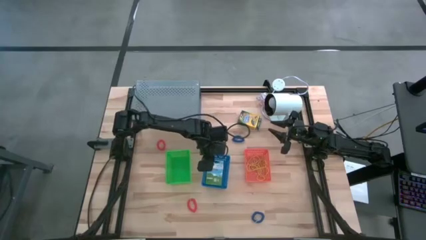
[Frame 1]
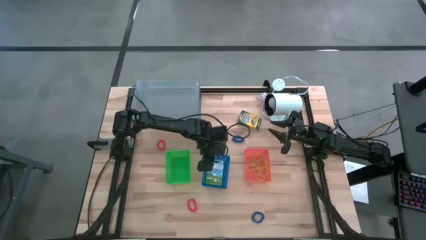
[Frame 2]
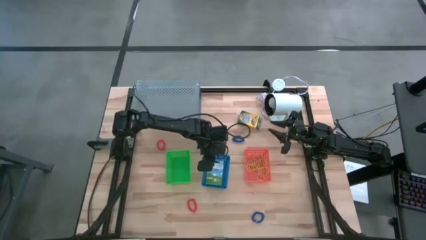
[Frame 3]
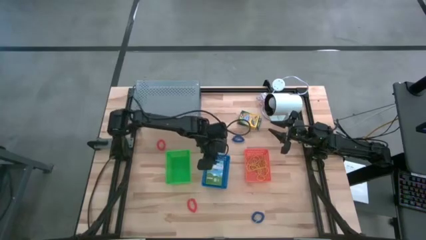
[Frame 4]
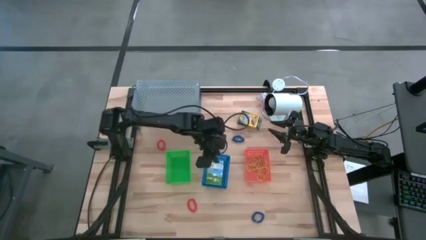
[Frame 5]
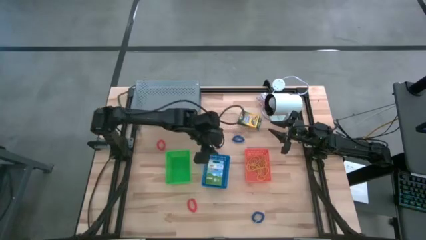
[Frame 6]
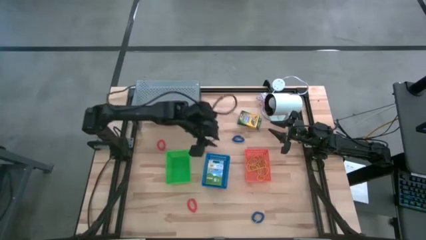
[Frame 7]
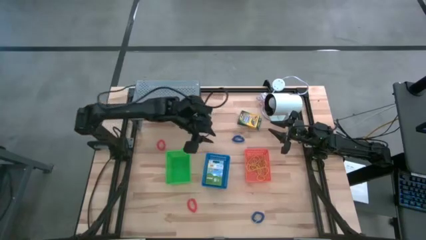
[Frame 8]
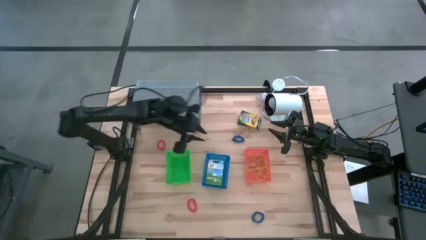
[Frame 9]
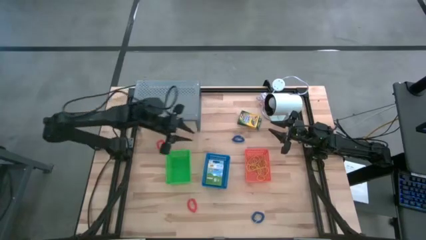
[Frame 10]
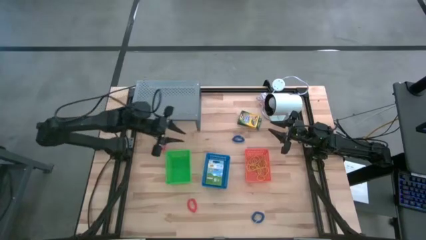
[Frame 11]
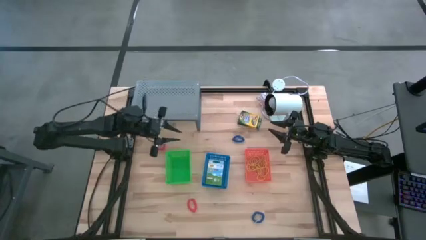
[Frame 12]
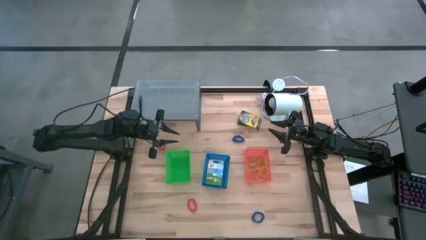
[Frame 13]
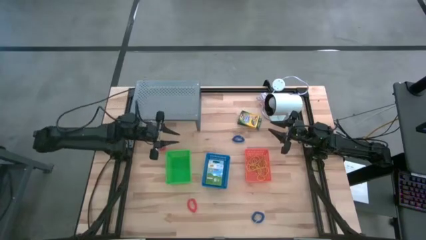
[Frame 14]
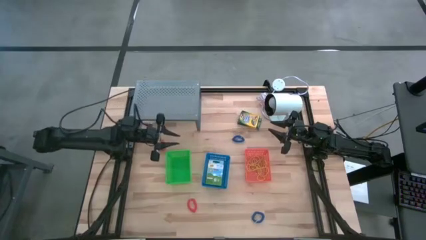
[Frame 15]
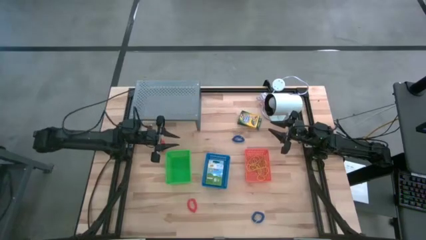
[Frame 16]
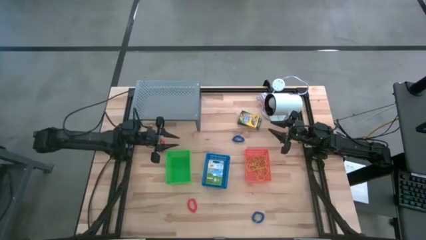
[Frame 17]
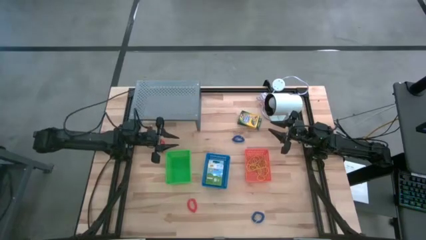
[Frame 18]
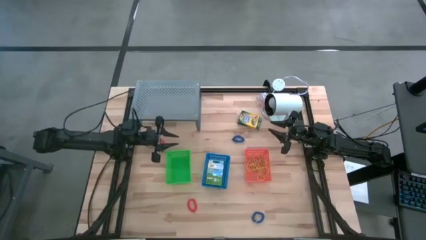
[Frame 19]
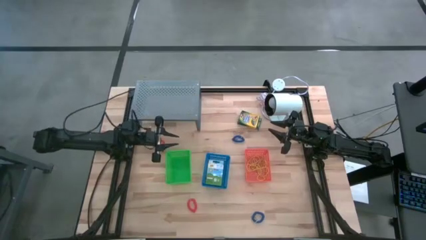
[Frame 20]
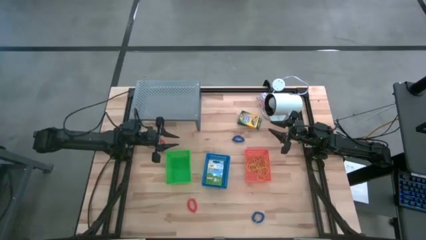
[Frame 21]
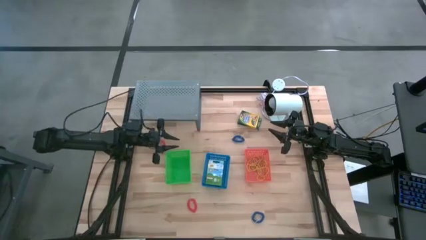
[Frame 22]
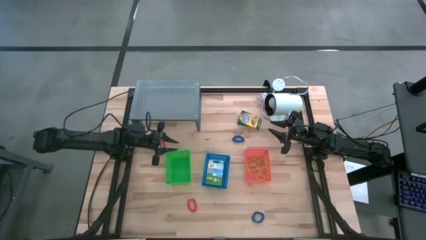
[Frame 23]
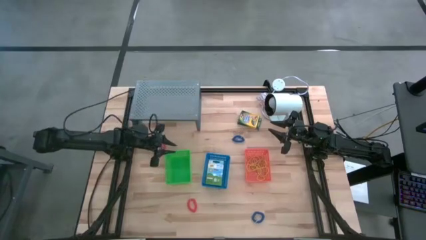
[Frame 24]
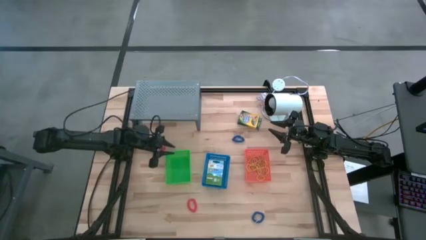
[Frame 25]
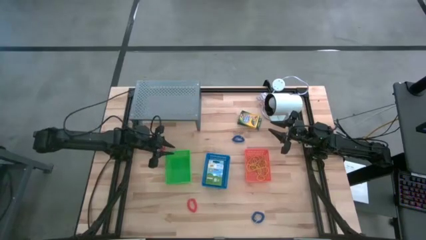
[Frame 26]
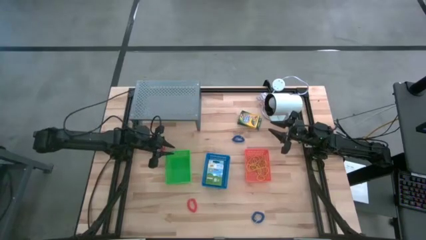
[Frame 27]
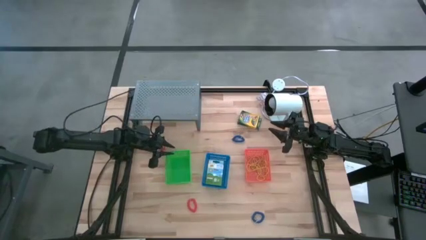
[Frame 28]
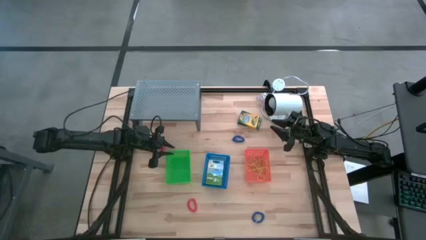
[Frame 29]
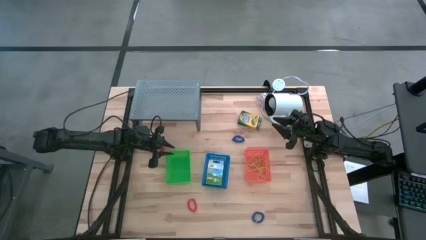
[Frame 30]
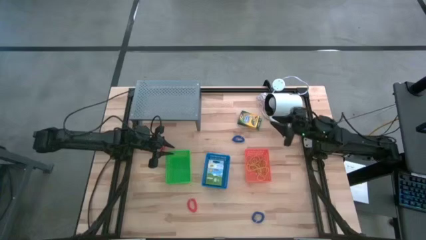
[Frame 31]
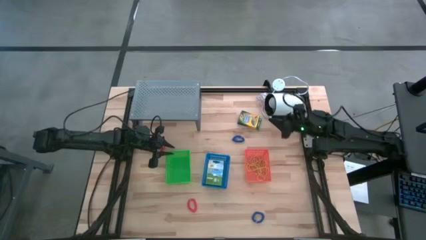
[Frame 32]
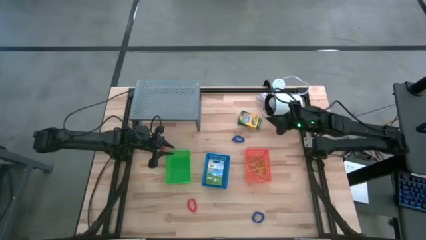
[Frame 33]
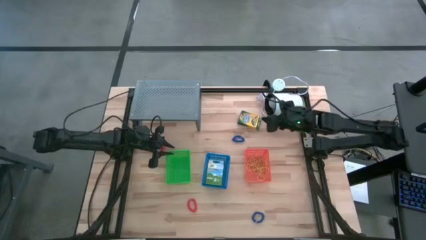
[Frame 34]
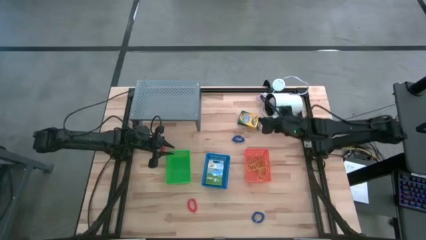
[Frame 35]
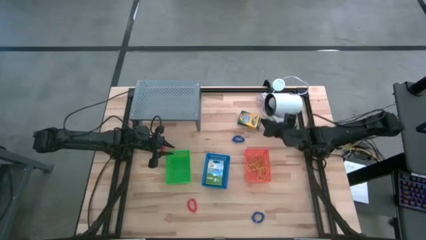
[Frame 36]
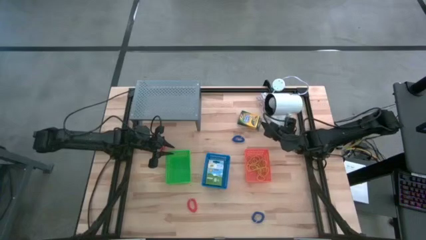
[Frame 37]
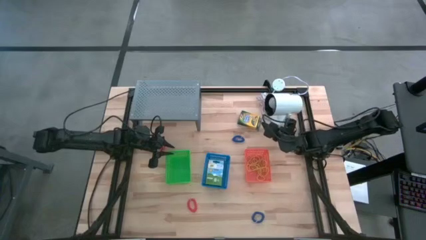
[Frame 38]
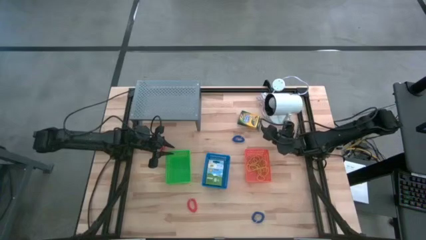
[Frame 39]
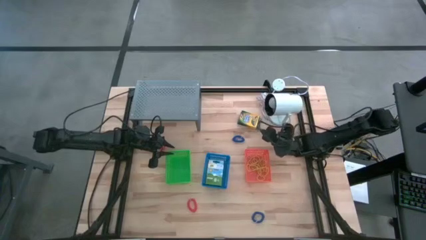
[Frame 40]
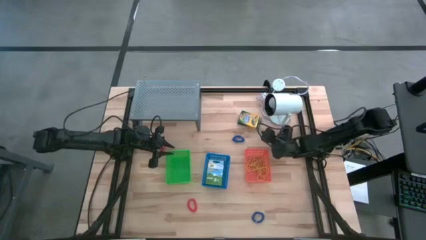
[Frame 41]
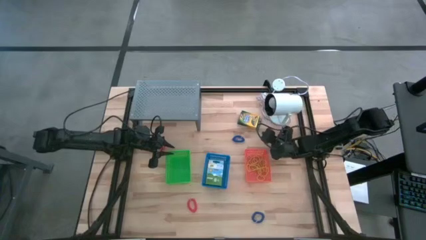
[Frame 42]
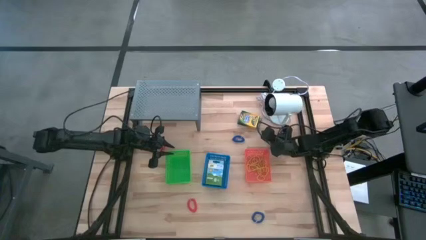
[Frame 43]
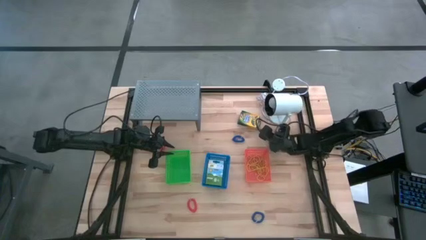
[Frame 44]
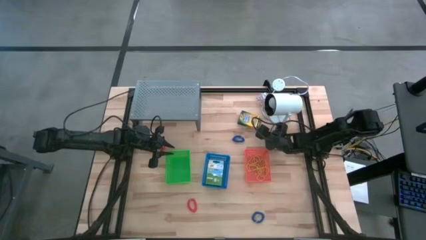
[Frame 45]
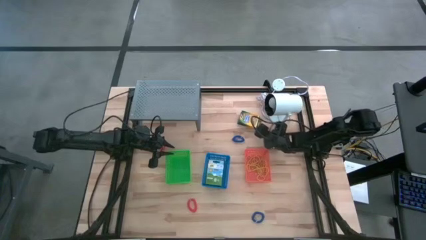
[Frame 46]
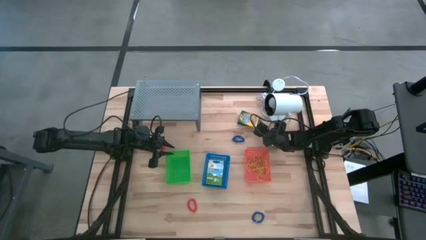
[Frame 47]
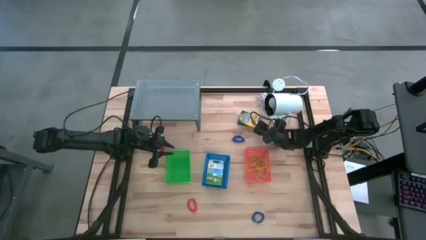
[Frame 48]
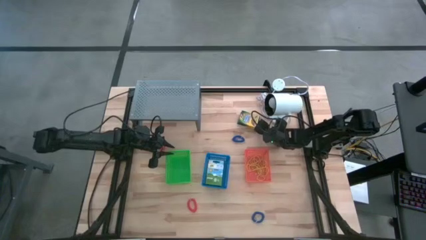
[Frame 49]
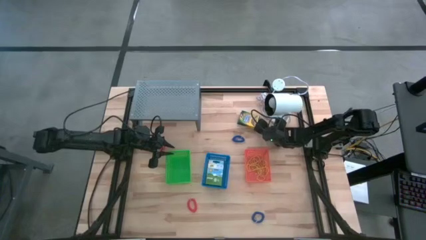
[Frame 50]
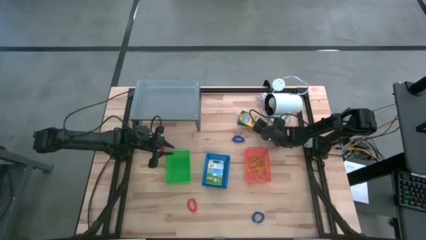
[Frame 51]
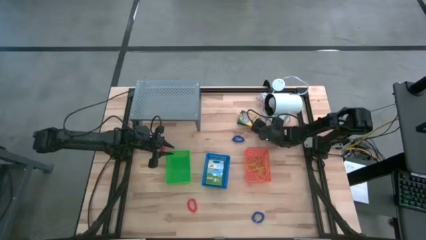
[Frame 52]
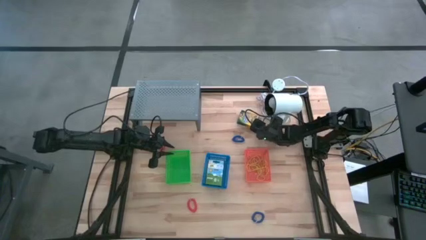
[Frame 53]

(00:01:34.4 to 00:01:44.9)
Task: Pick & Place Office Desk Supplies
Put the crayon box into the blue bin

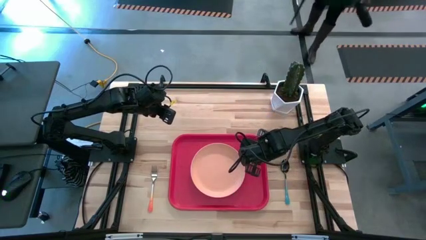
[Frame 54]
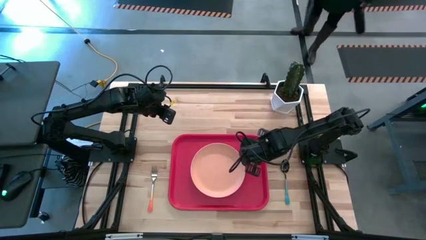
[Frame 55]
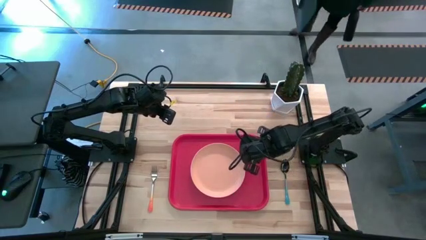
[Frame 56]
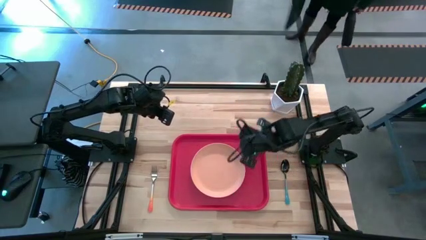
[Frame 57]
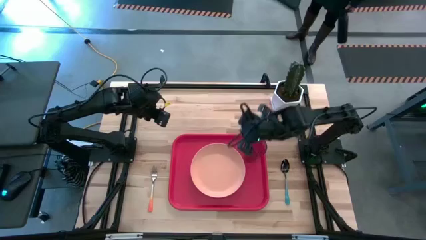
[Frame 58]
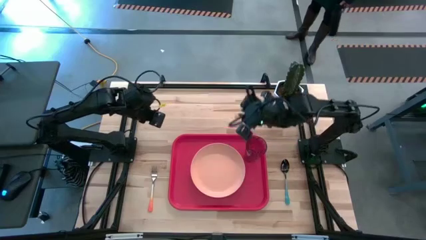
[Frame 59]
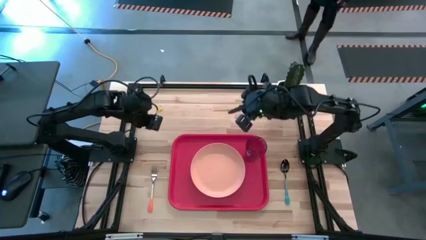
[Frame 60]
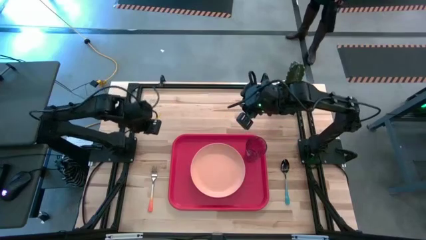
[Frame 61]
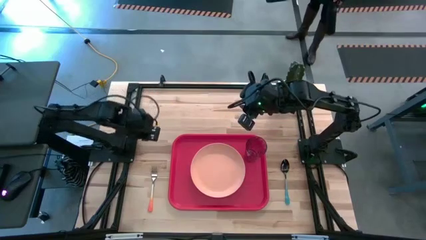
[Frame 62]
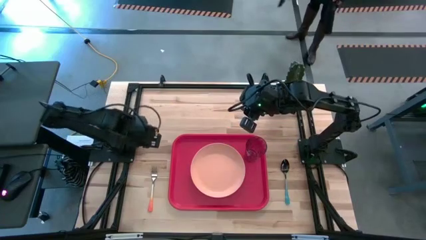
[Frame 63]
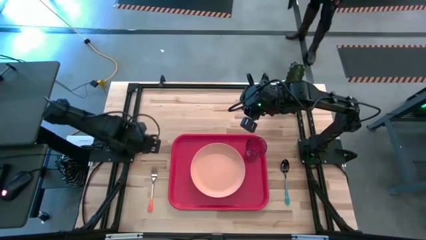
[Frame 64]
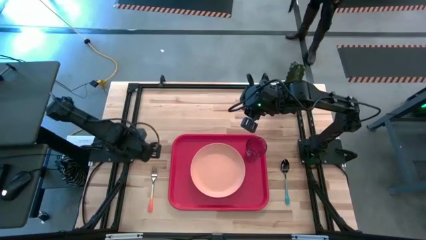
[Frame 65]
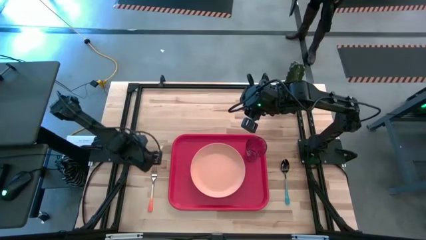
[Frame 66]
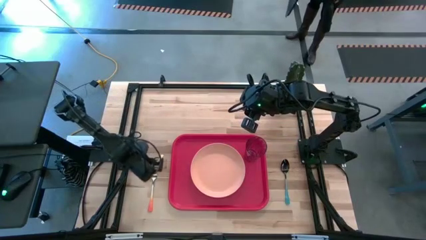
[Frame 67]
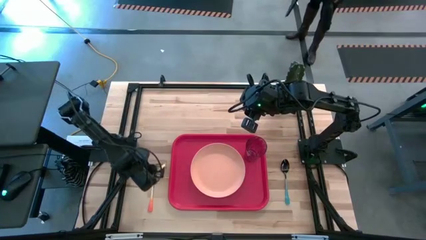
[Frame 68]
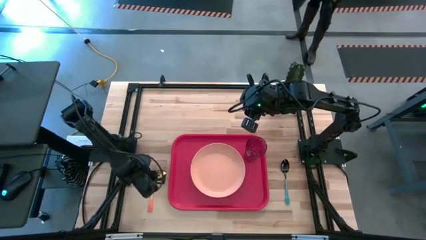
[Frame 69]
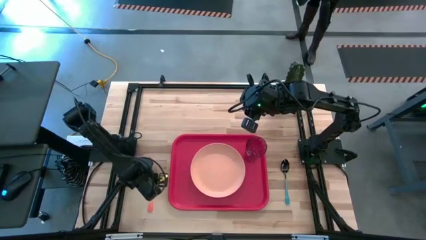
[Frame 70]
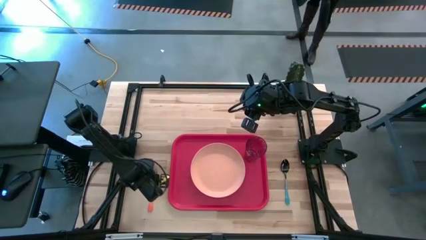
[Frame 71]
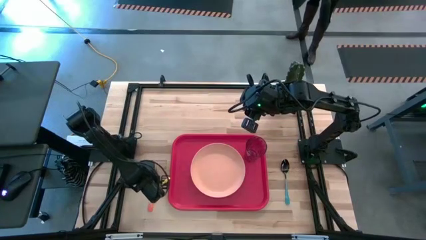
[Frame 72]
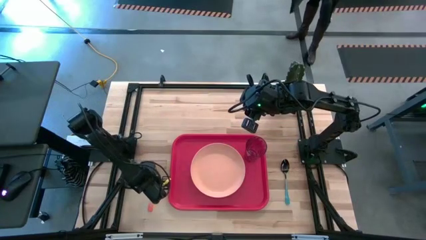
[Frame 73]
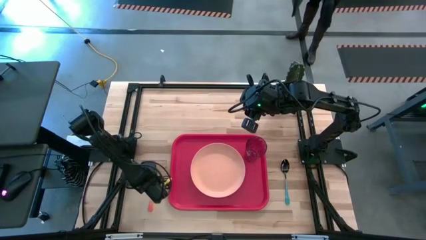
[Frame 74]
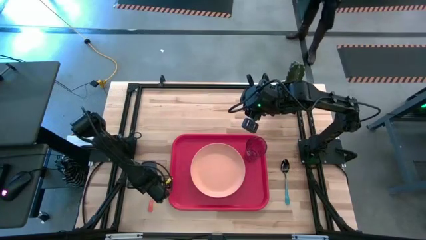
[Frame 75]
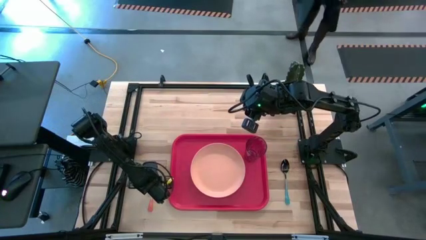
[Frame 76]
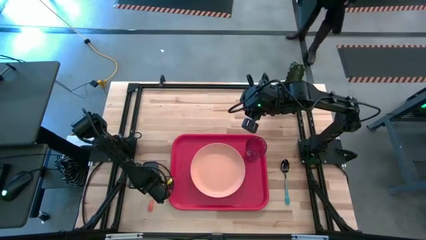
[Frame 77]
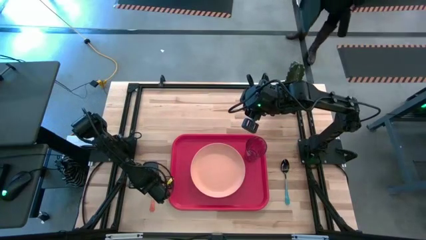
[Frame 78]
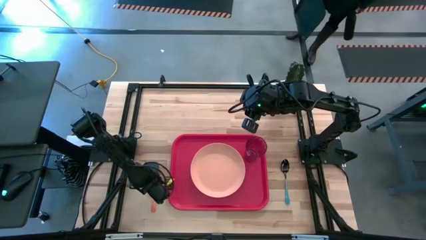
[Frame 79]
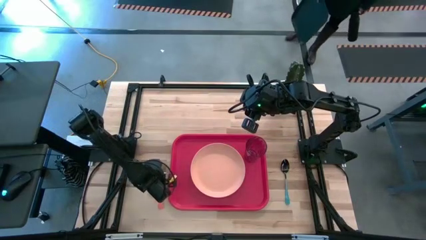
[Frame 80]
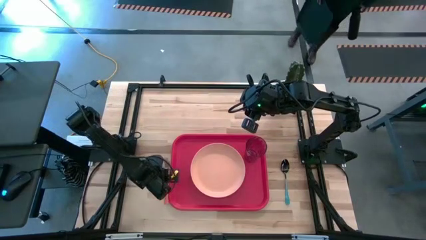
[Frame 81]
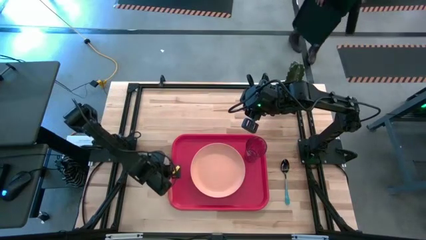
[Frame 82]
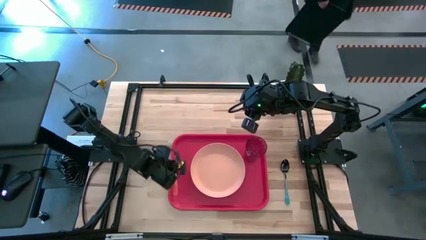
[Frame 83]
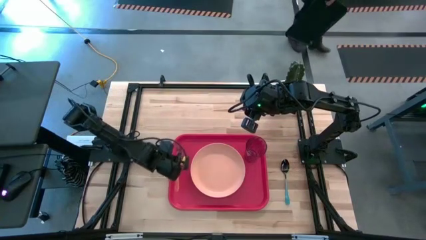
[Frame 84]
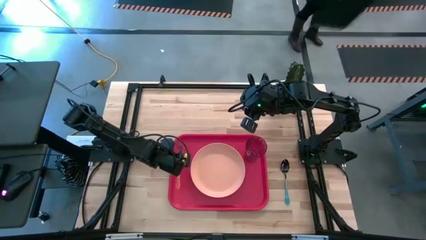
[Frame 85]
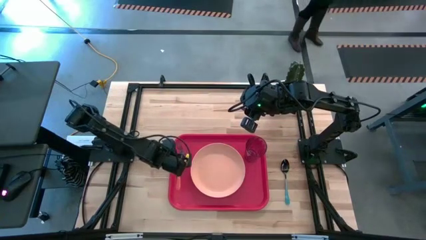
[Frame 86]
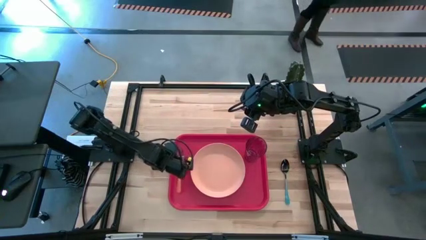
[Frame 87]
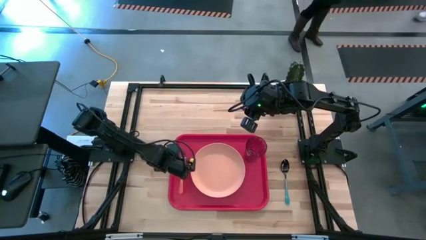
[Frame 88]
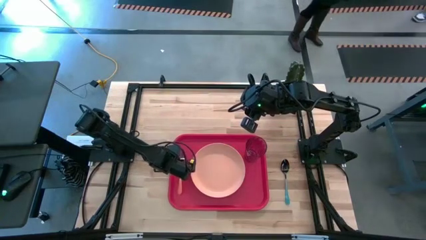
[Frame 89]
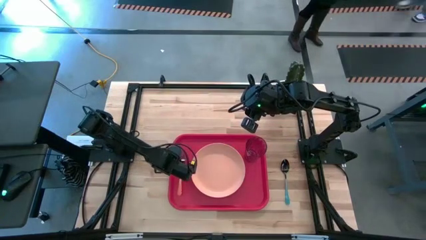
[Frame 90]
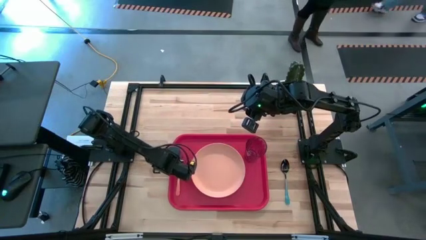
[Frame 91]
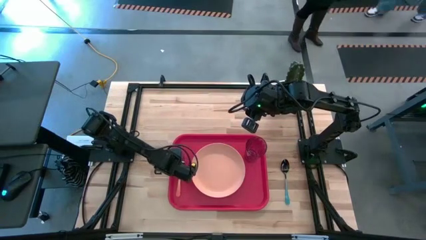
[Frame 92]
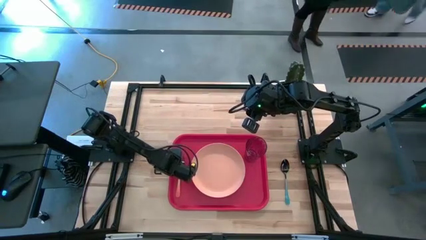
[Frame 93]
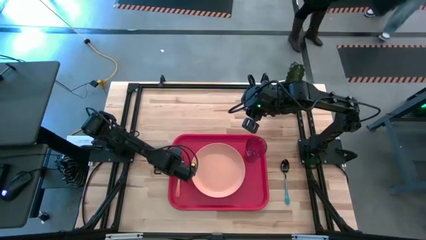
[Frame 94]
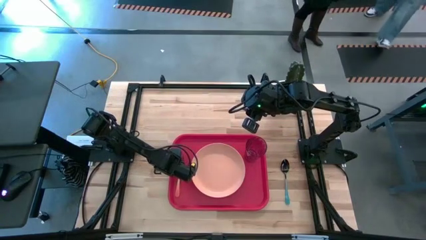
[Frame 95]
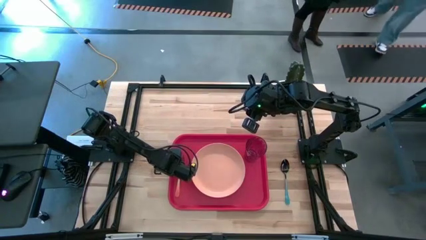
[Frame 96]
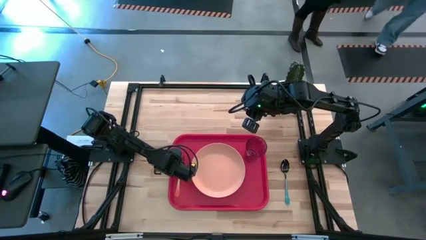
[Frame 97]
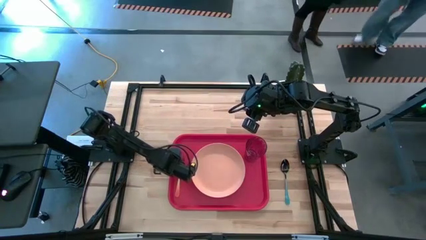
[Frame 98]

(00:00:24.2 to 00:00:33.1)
Task: Pick and place plate/cup/fork/spoon on tray
Put the orange fork to the left of the light pink plate on the red tray
